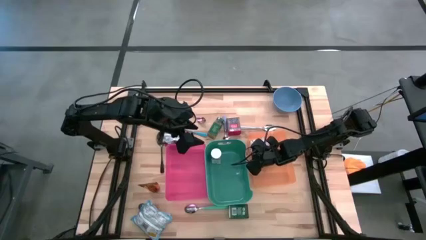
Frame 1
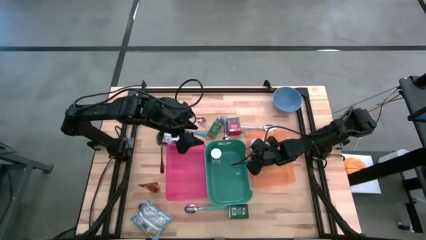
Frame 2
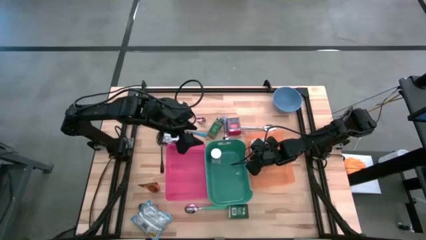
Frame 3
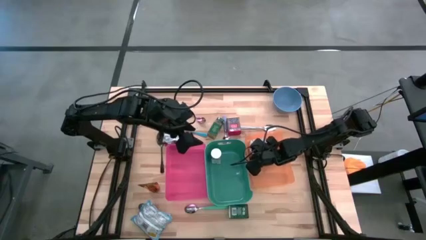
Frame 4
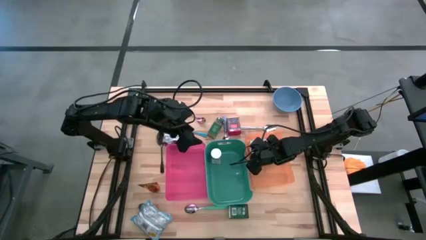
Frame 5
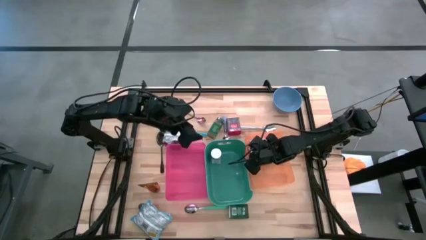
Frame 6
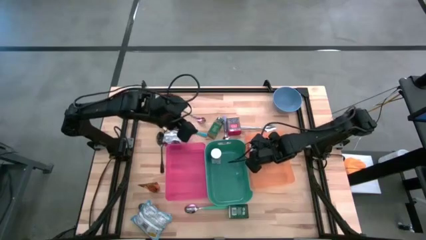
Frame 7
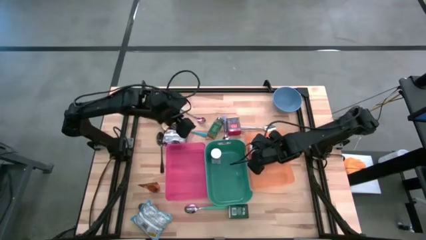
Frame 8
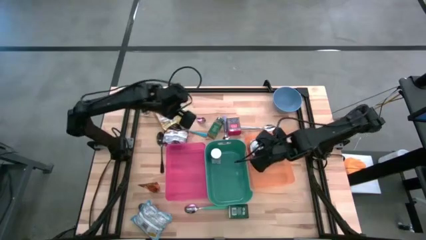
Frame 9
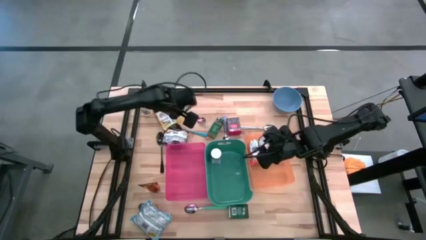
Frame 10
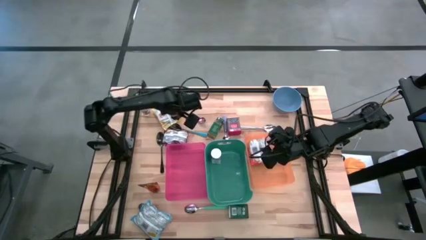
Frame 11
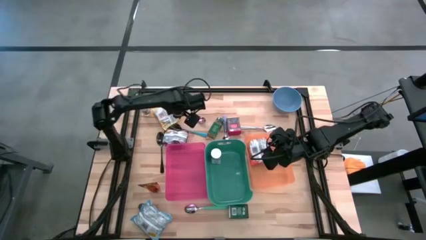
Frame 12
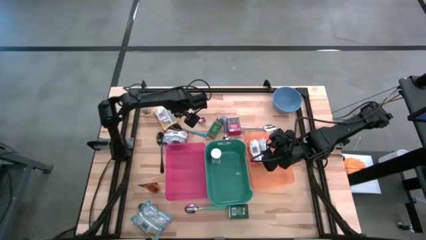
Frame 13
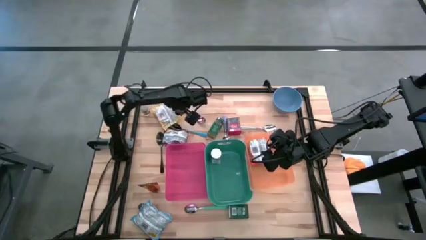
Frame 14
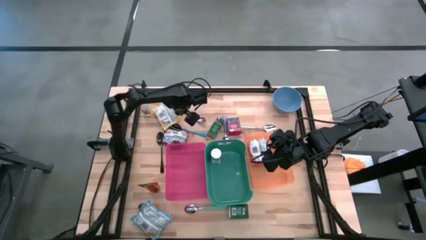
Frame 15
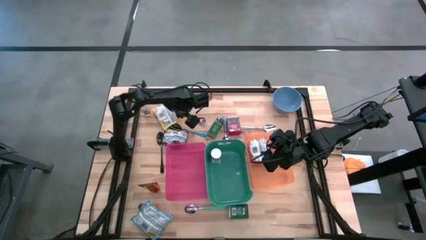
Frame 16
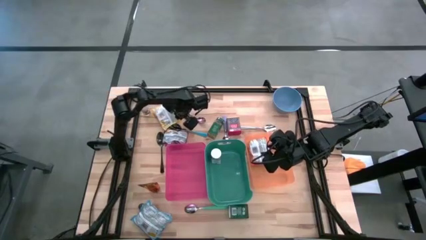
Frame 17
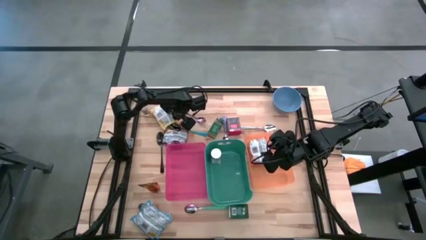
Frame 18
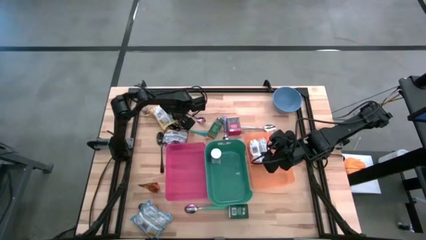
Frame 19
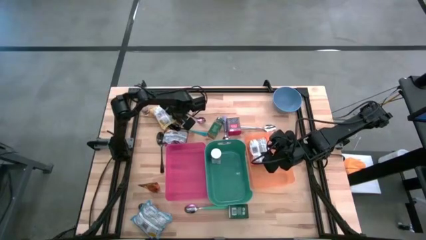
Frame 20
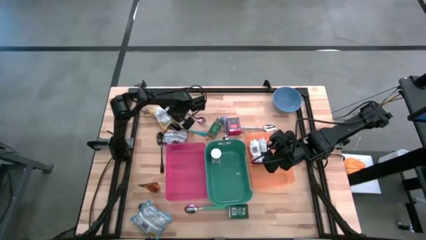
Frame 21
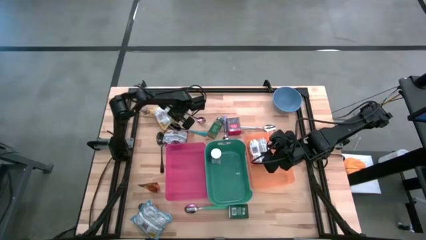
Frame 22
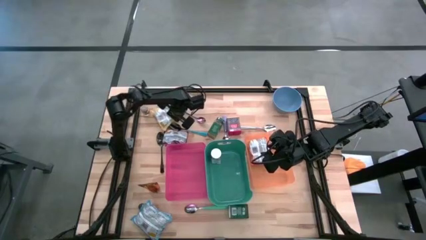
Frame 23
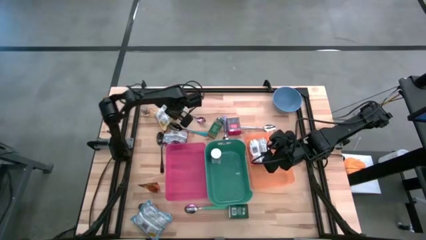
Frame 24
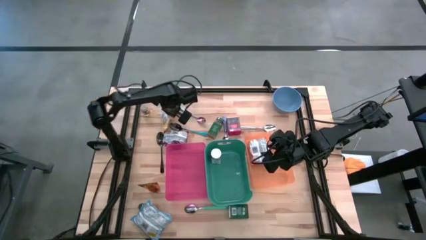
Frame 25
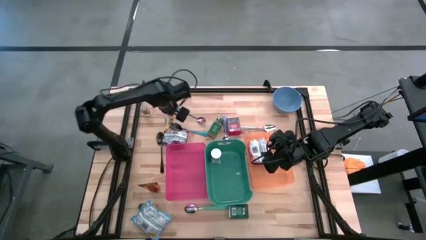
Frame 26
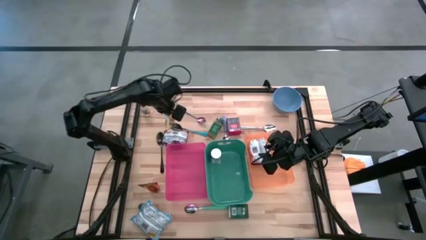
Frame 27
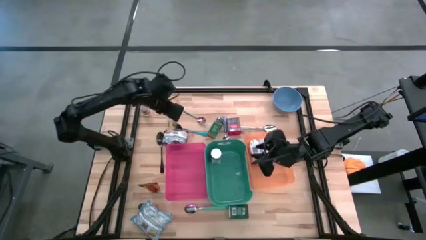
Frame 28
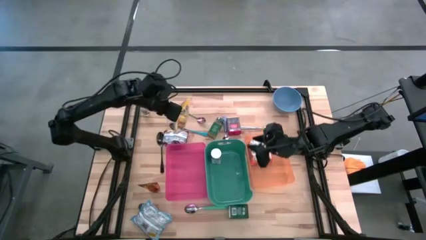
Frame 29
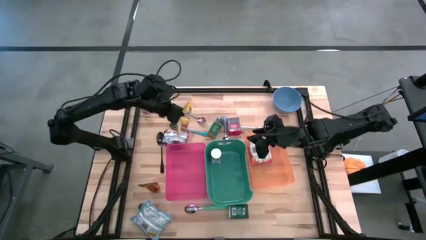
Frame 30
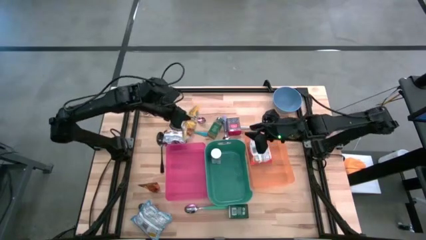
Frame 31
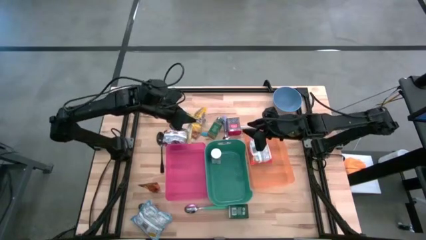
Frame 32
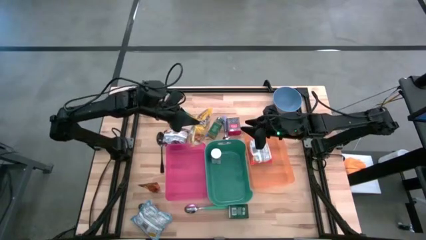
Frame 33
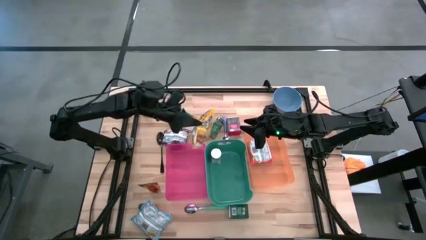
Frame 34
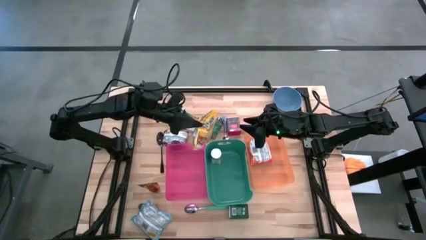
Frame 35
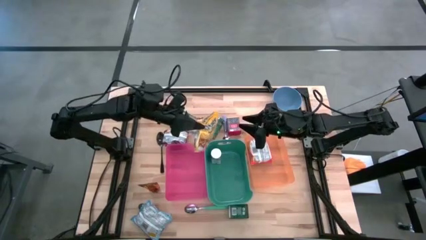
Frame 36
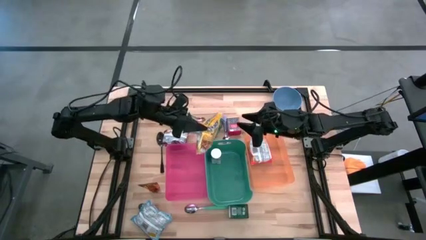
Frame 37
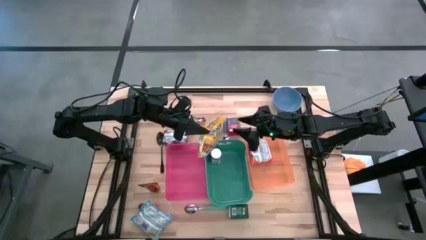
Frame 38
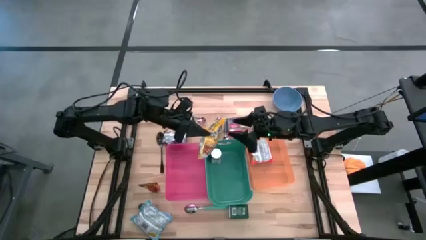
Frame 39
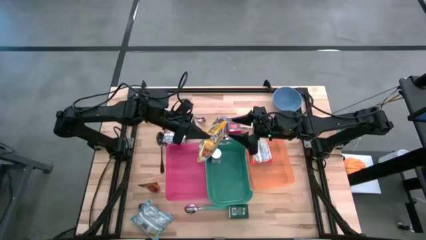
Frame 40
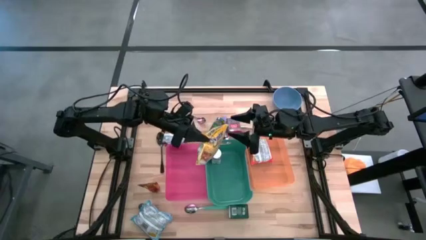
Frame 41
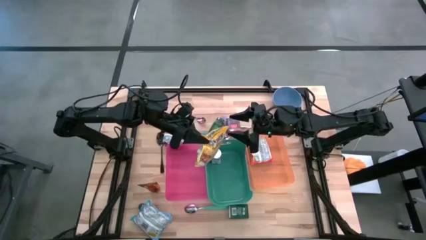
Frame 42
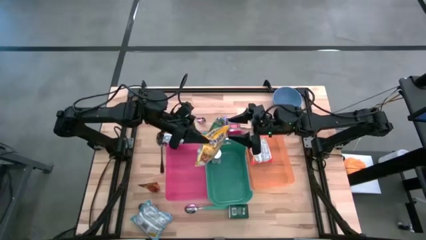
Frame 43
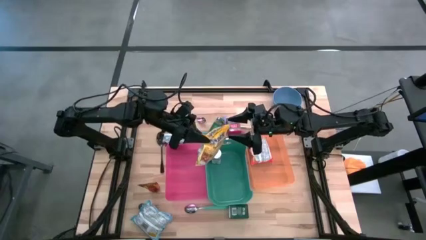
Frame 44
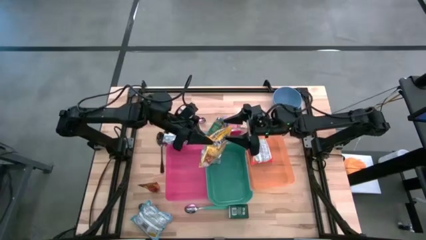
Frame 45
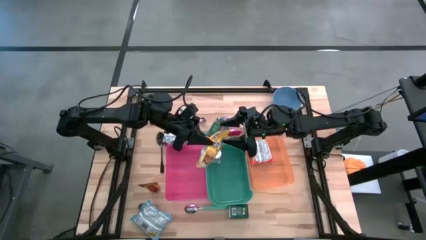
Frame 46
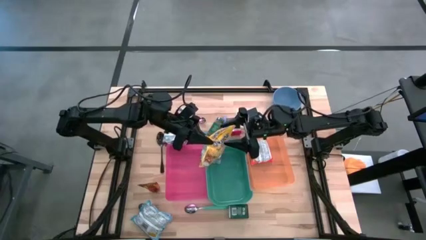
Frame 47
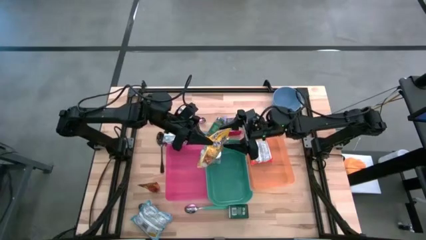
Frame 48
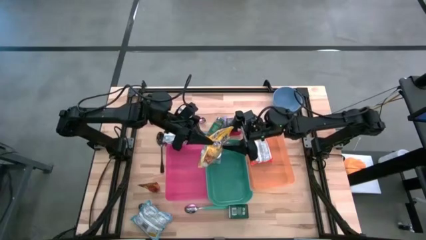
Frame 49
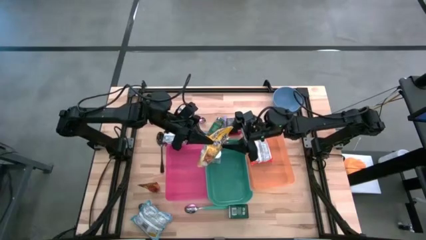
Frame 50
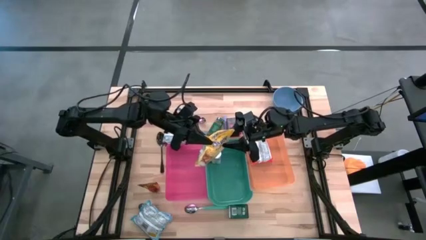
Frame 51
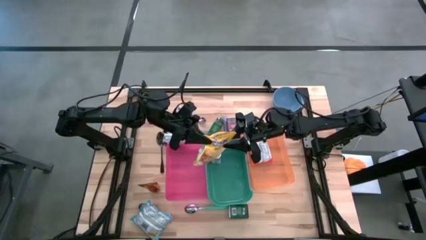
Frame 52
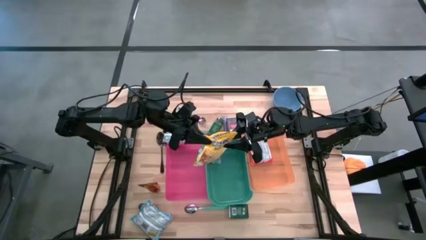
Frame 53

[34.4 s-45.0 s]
Put the yellow noodle pack into the orange bin
